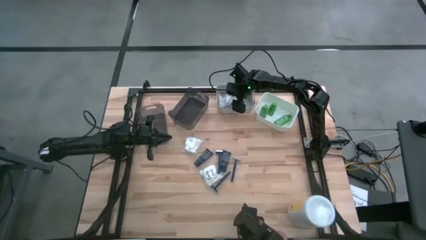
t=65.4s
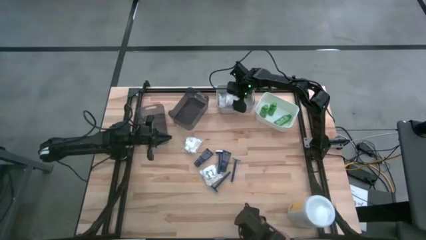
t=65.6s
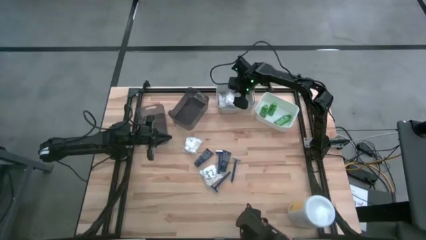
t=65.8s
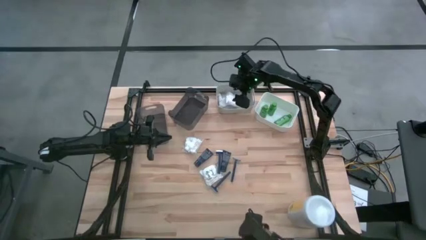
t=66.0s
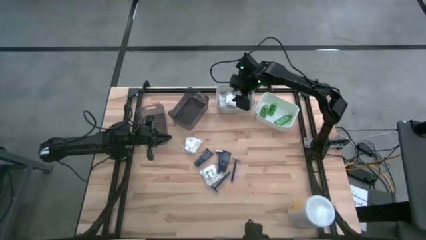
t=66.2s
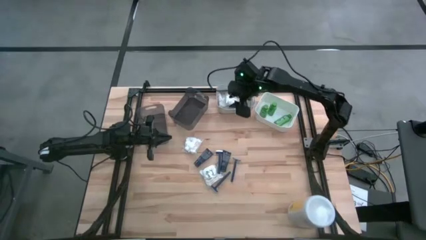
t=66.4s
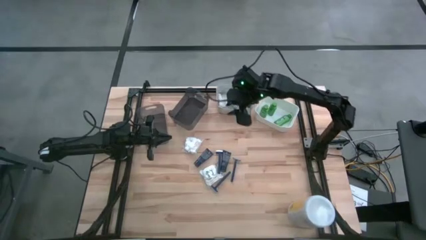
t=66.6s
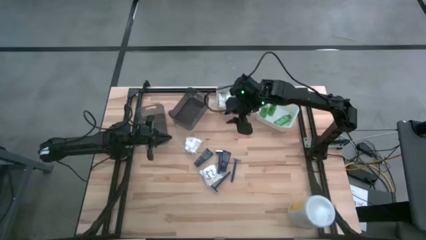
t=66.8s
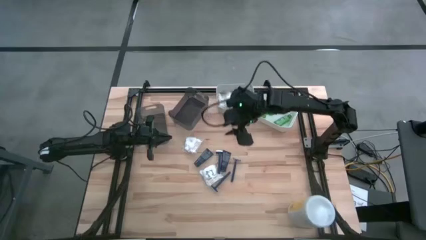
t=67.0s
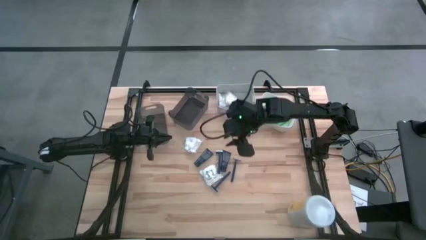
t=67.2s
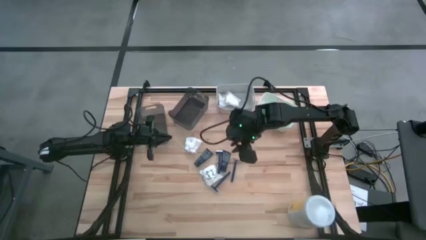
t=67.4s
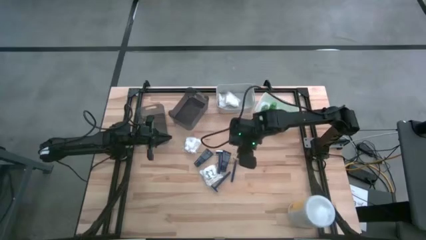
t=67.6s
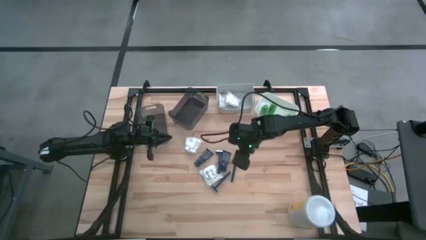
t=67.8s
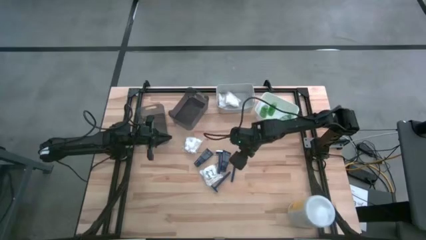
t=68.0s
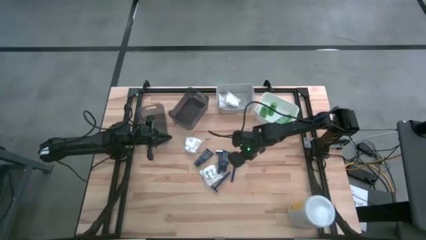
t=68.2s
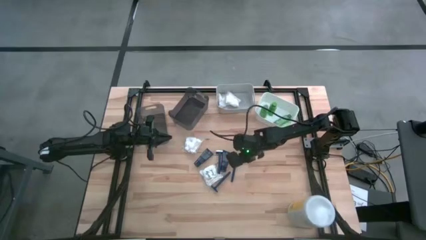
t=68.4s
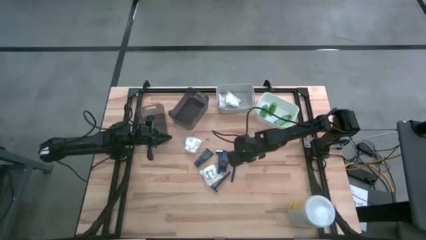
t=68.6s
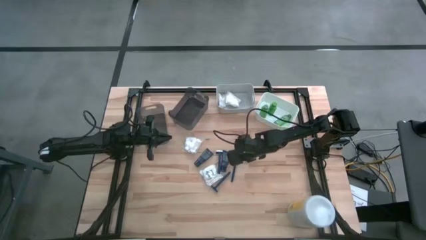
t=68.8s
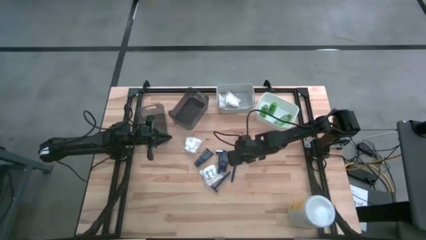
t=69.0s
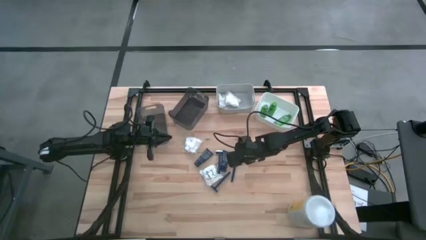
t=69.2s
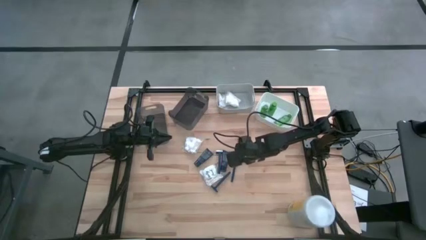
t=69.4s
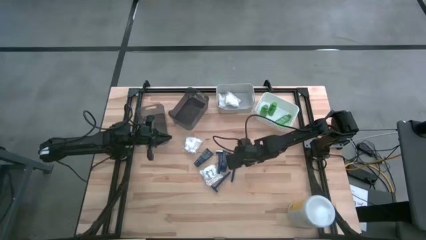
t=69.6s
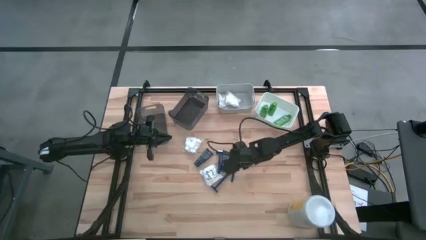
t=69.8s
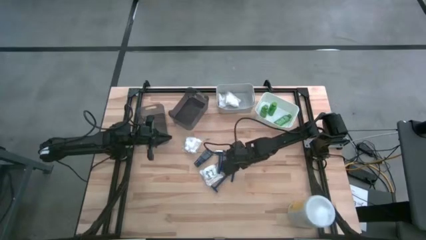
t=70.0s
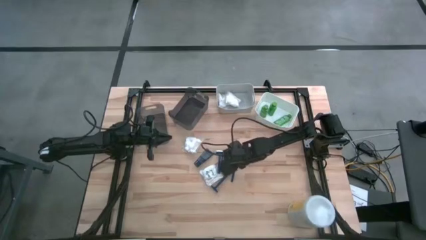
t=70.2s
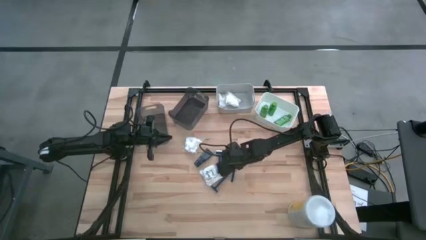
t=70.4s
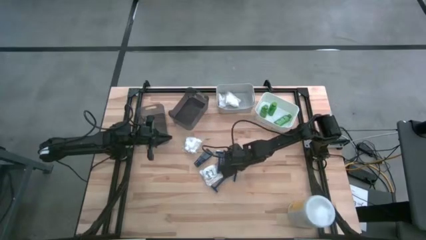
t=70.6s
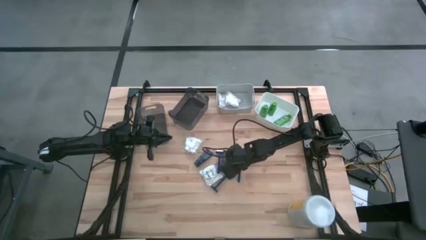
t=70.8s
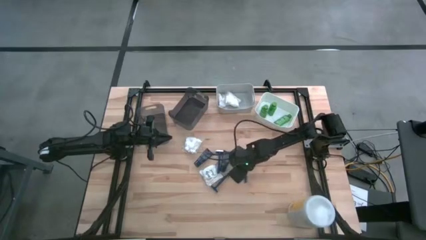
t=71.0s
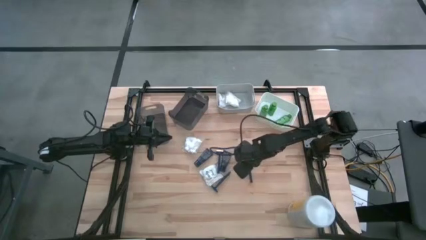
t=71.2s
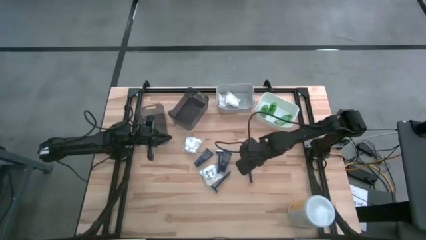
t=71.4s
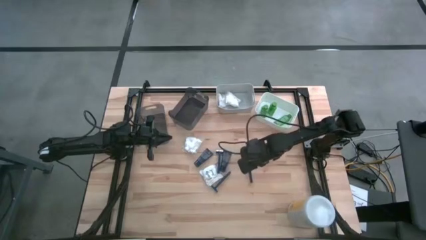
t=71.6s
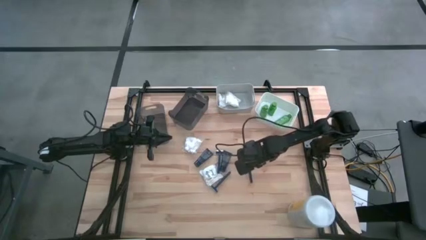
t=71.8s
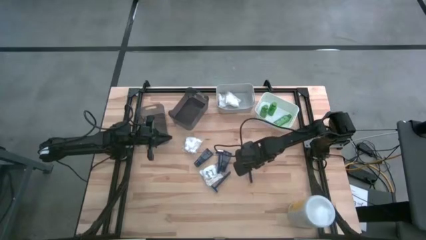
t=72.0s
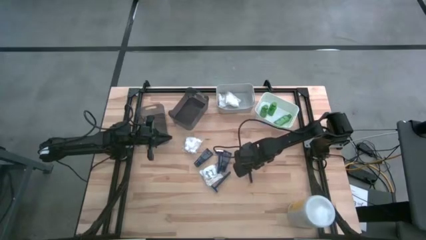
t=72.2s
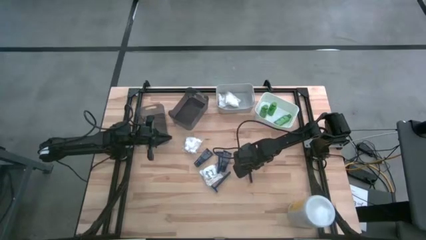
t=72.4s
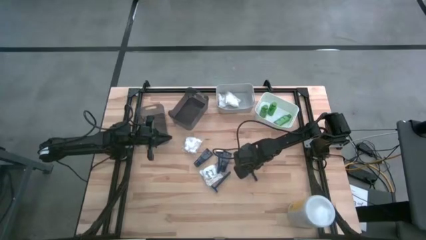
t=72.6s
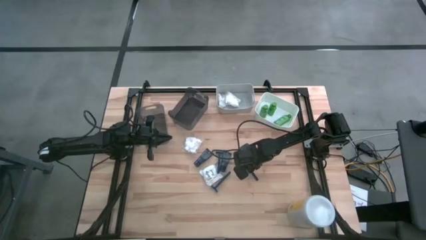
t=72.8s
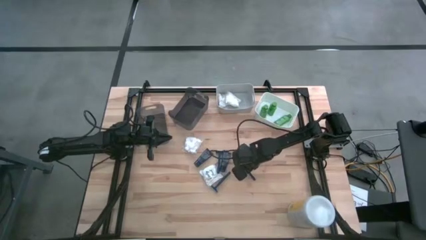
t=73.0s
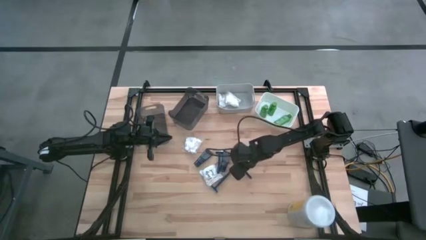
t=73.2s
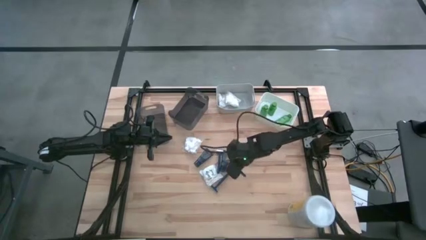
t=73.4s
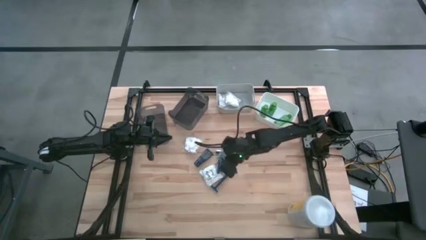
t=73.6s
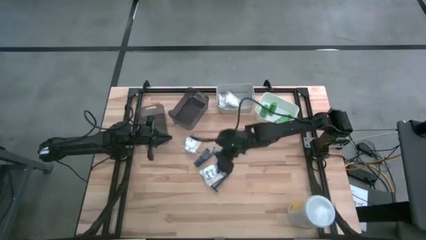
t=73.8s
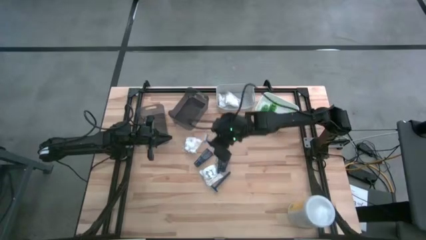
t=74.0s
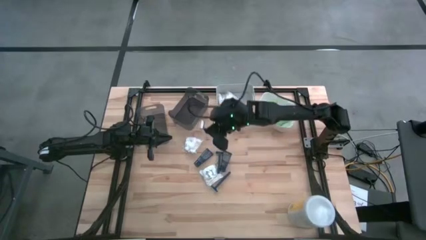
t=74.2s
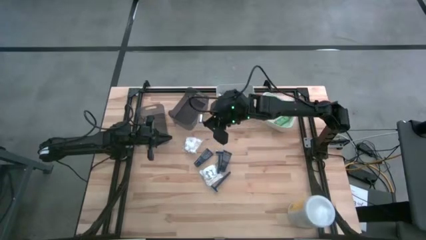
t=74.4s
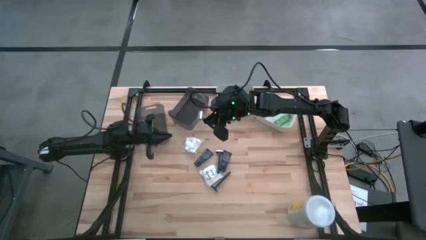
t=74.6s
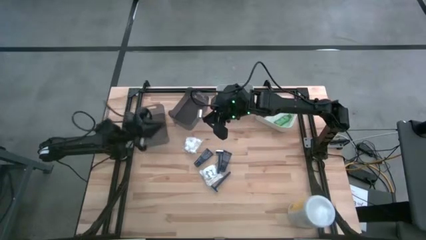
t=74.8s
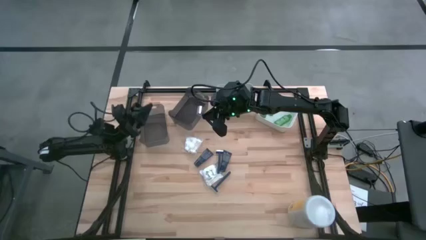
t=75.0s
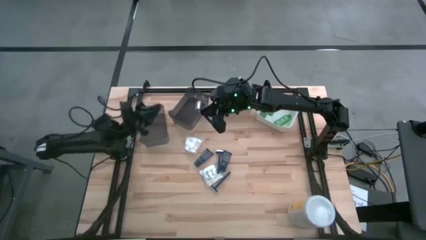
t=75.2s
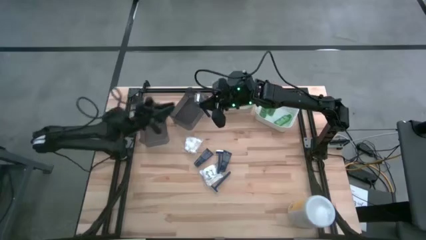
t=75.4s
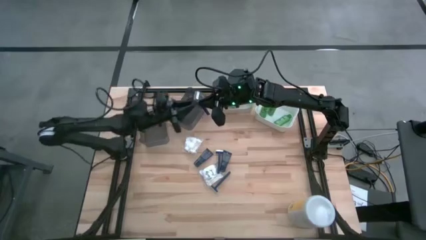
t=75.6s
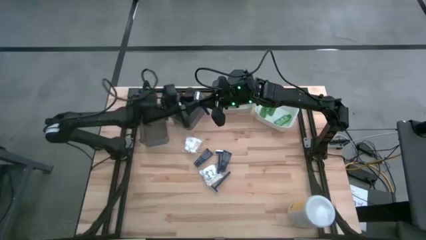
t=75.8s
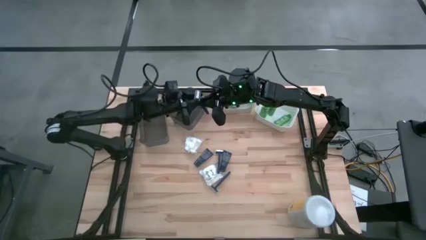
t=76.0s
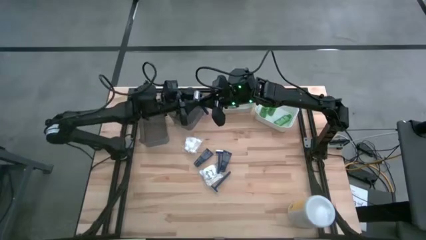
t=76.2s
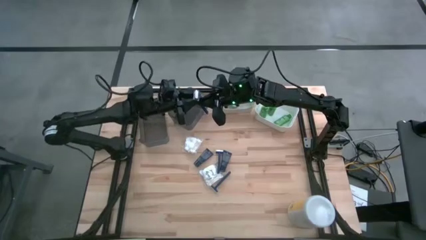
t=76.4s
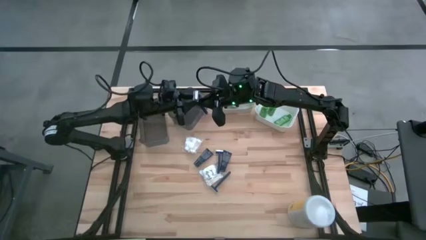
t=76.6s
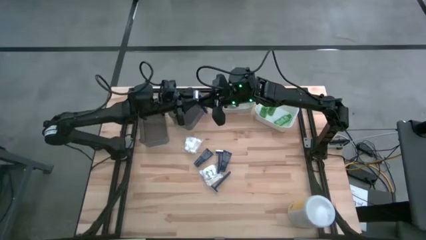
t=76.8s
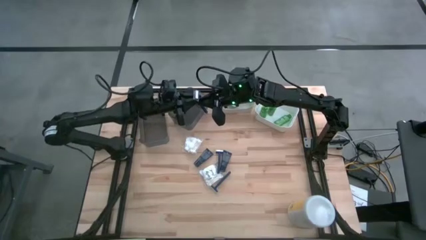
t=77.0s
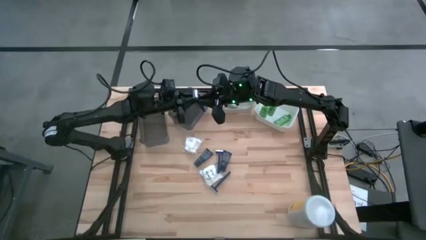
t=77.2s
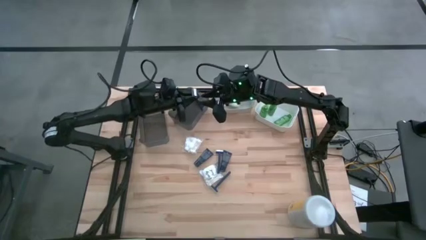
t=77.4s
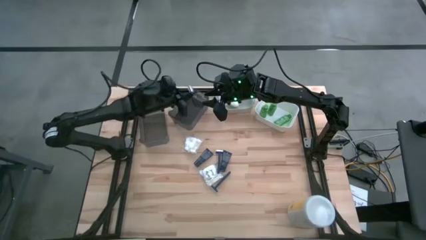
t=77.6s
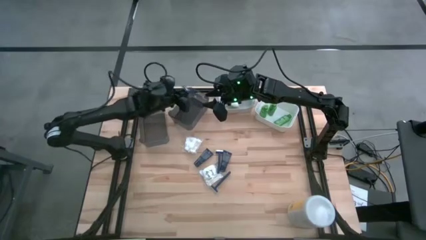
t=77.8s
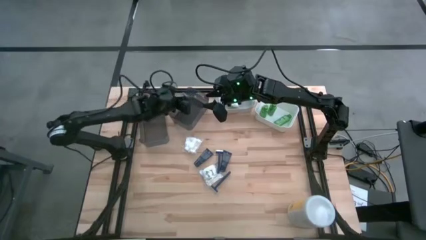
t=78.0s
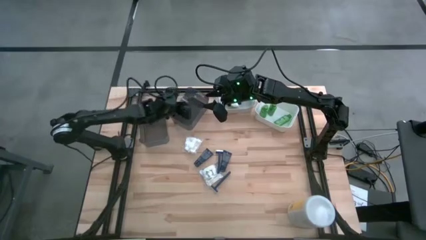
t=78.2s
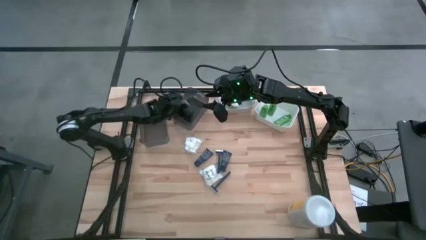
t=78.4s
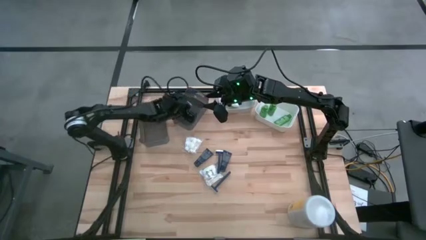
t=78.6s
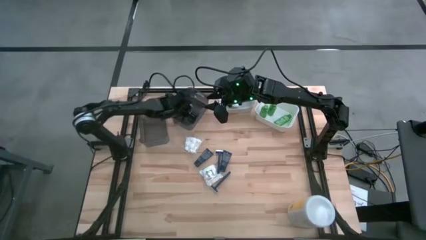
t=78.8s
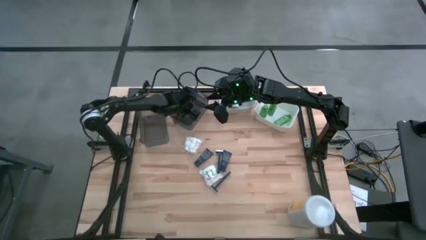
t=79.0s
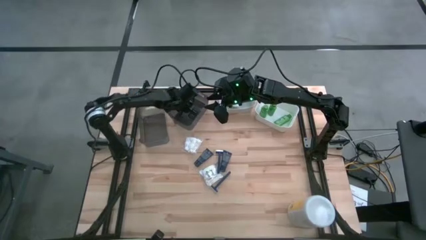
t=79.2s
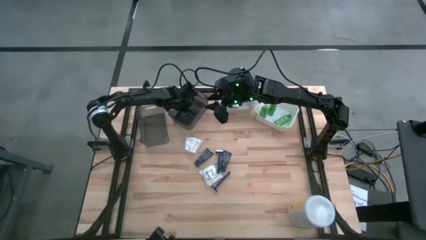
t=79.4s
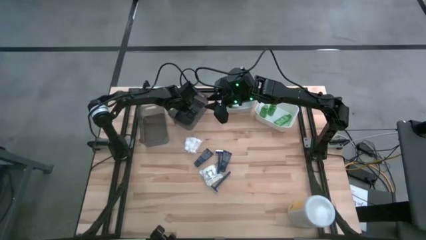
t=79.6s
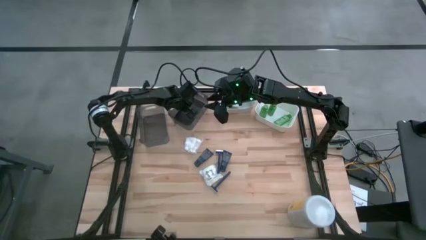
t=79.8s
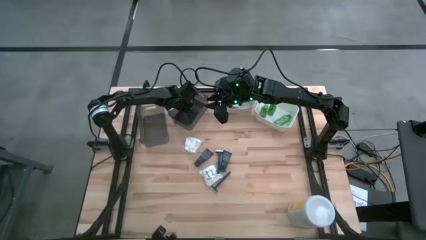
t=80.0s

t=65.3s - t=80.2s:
Task: Pick & Place Travel size toiletries
Put the right razor into the right black bin
